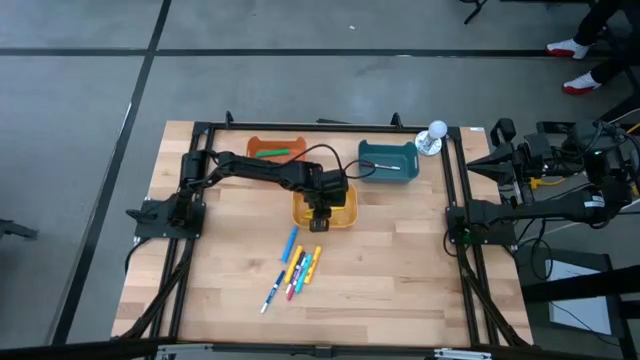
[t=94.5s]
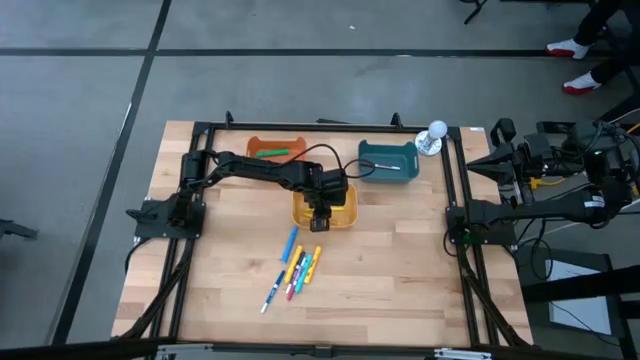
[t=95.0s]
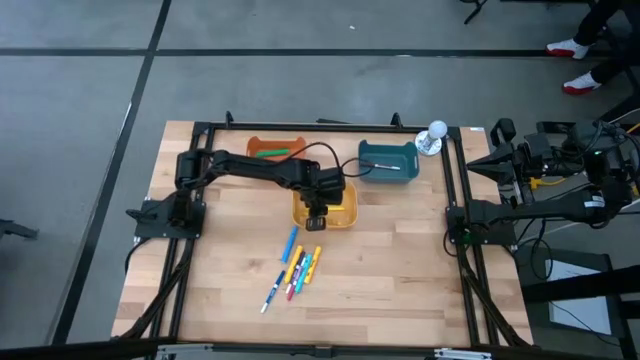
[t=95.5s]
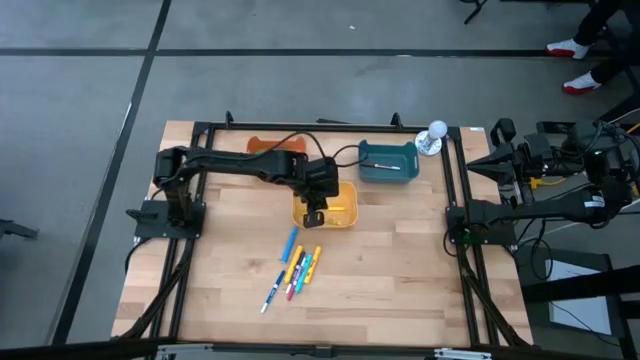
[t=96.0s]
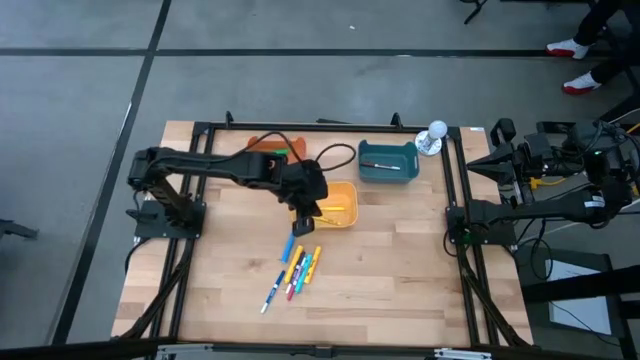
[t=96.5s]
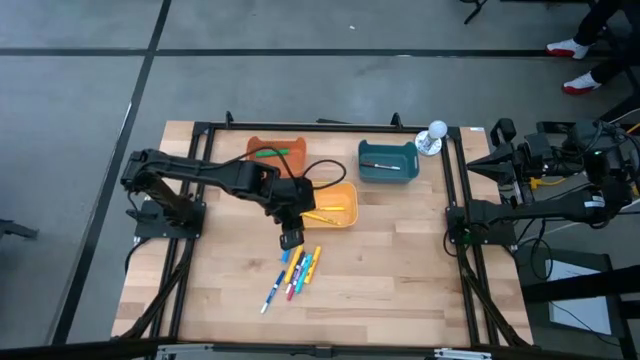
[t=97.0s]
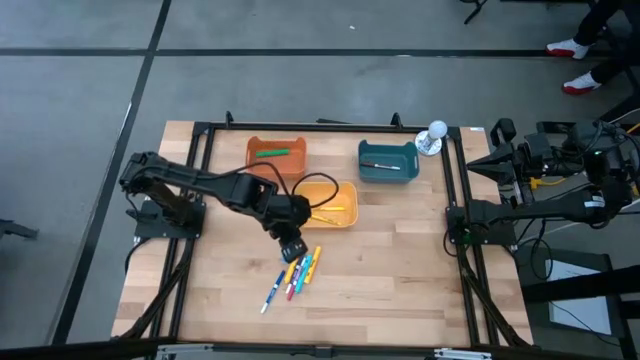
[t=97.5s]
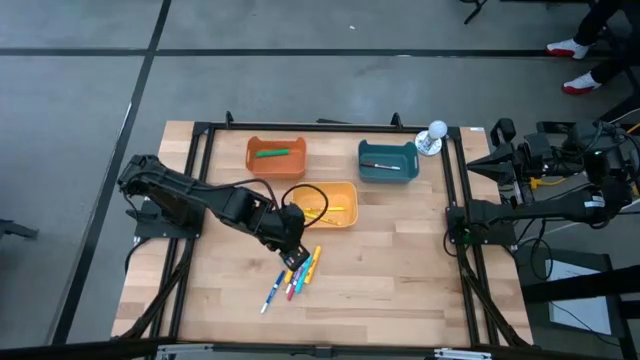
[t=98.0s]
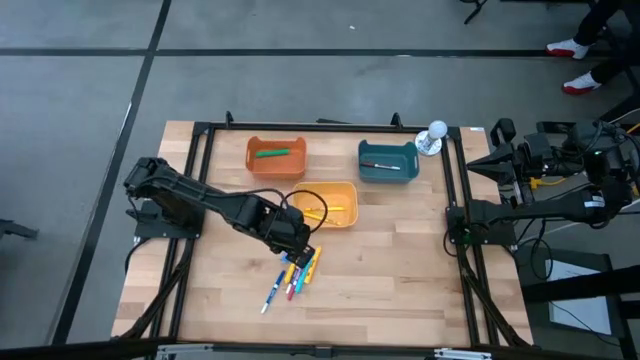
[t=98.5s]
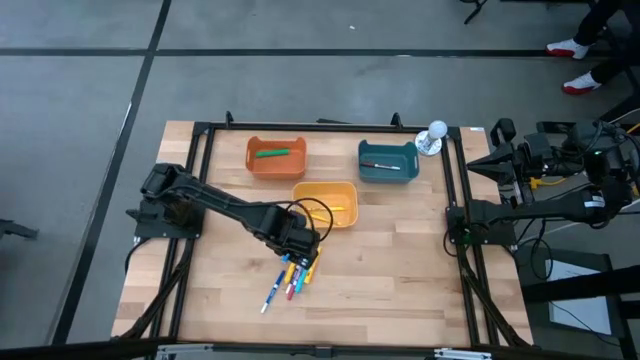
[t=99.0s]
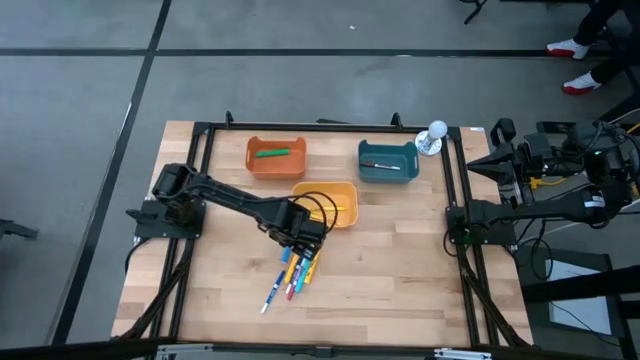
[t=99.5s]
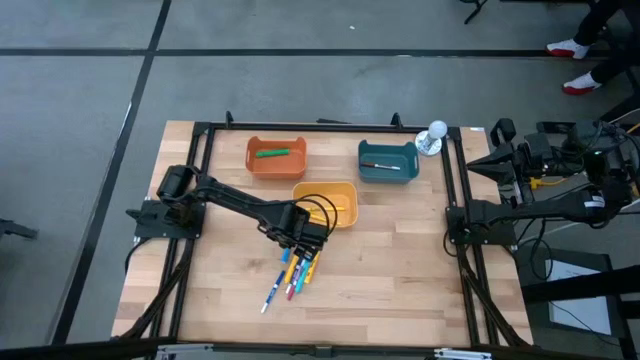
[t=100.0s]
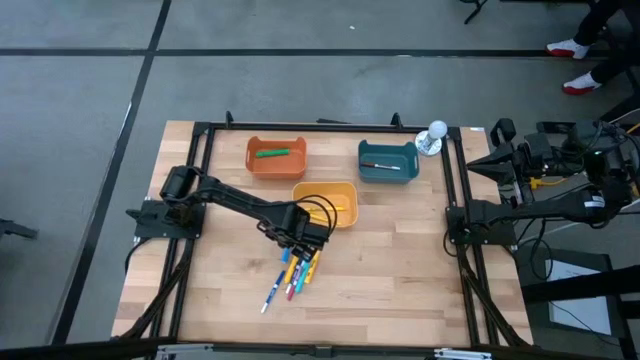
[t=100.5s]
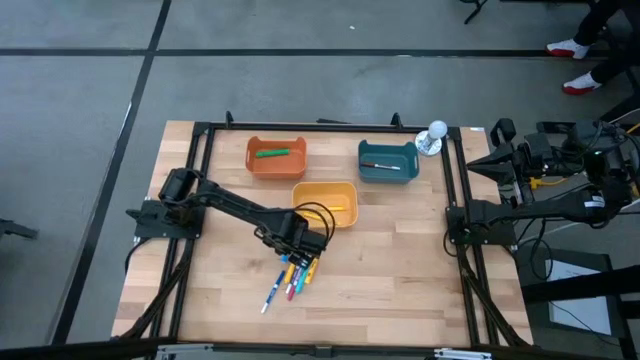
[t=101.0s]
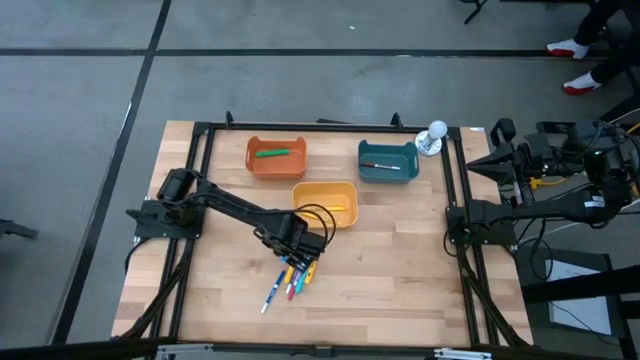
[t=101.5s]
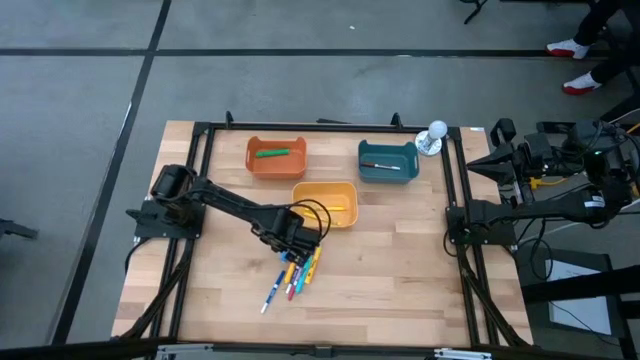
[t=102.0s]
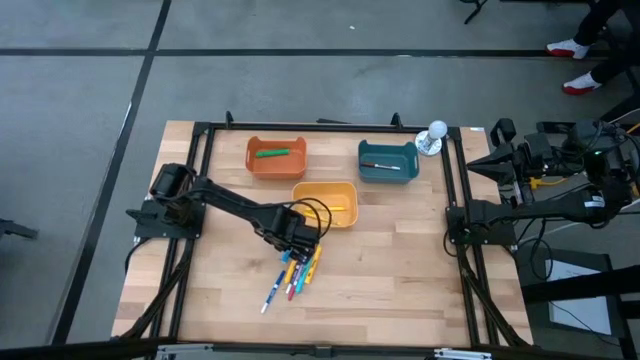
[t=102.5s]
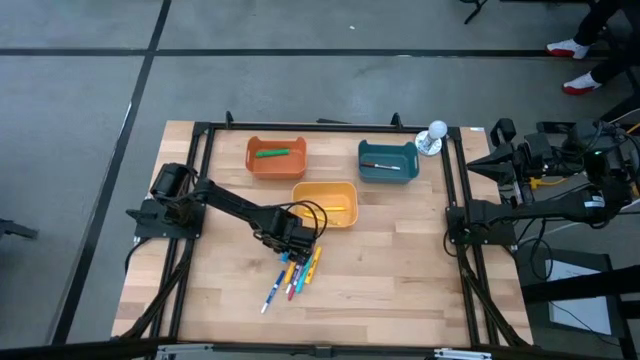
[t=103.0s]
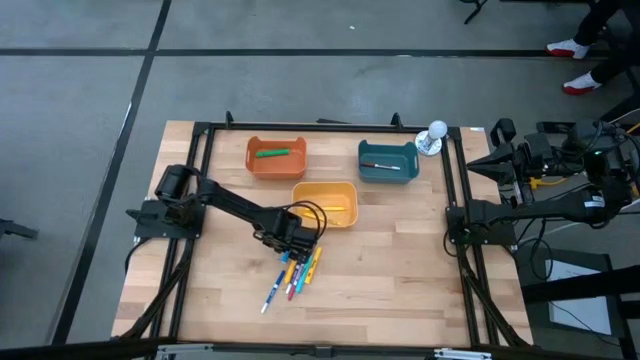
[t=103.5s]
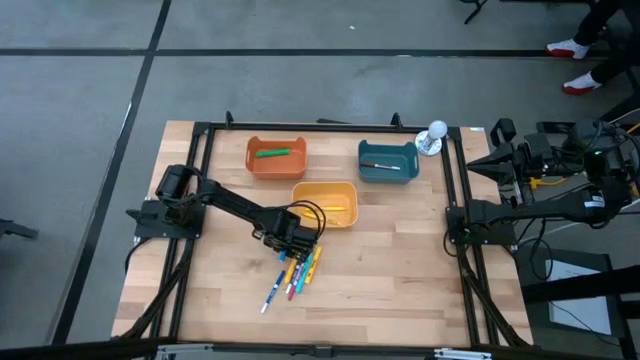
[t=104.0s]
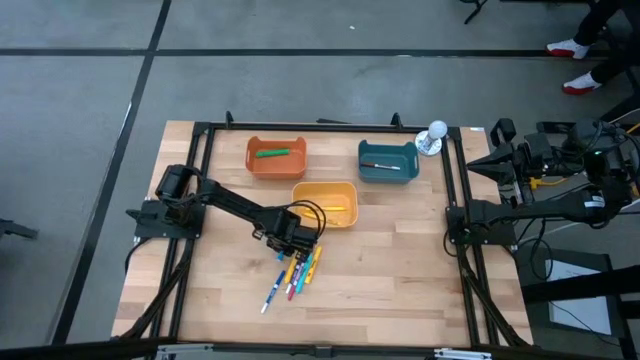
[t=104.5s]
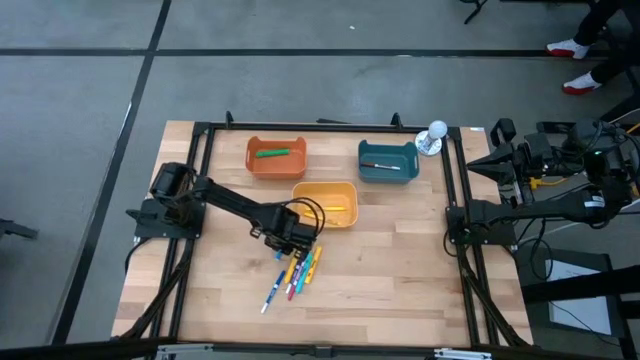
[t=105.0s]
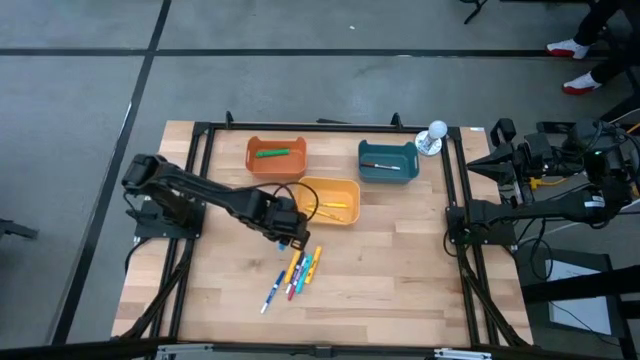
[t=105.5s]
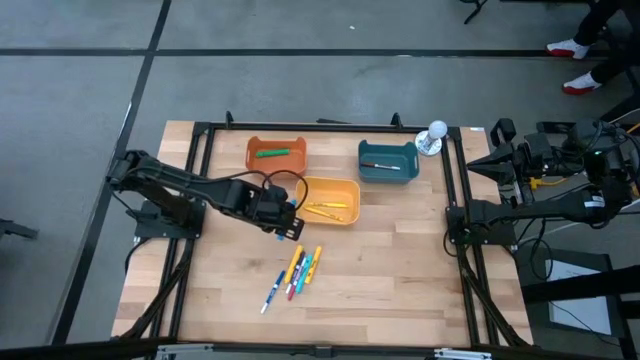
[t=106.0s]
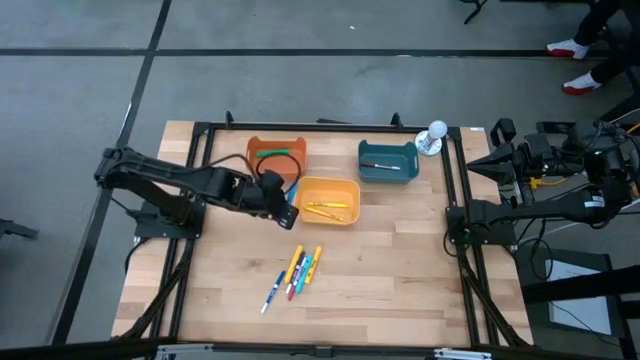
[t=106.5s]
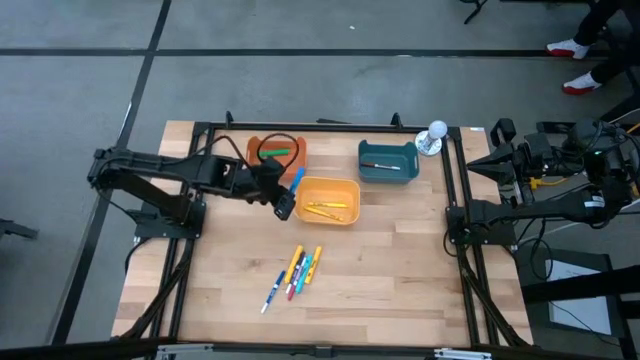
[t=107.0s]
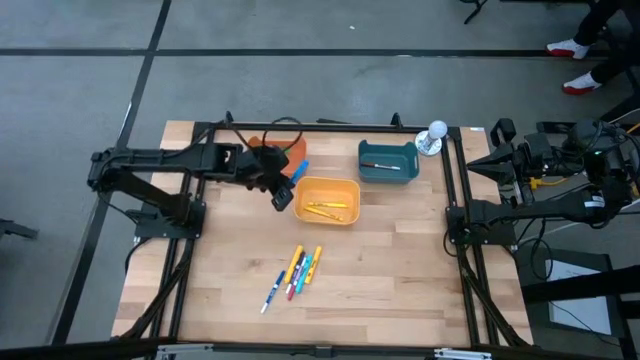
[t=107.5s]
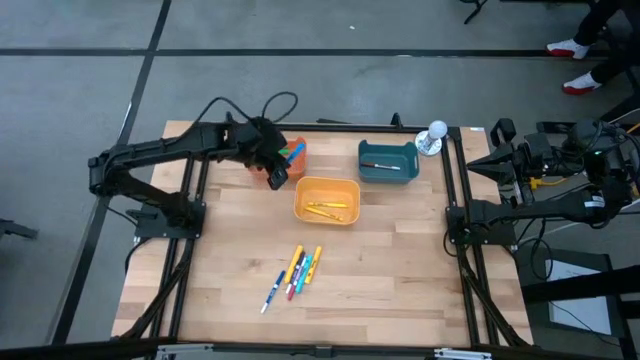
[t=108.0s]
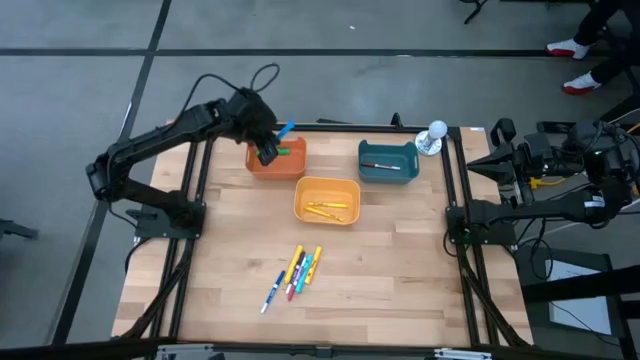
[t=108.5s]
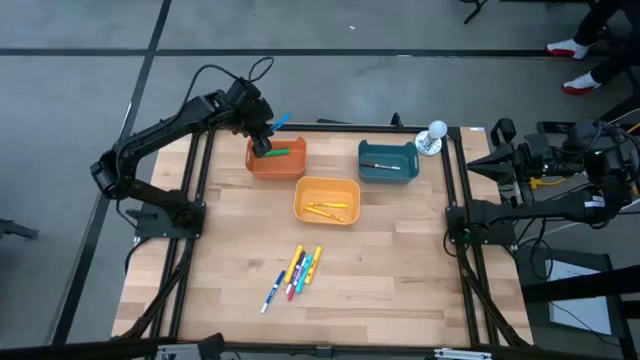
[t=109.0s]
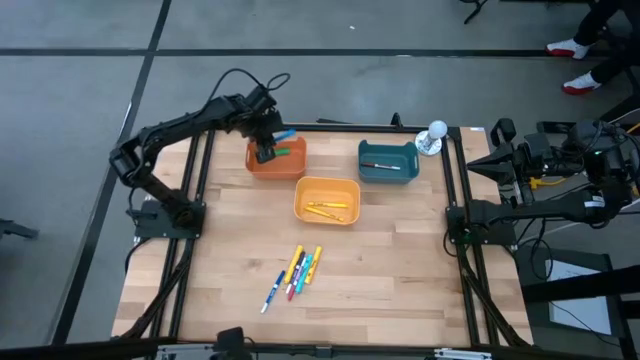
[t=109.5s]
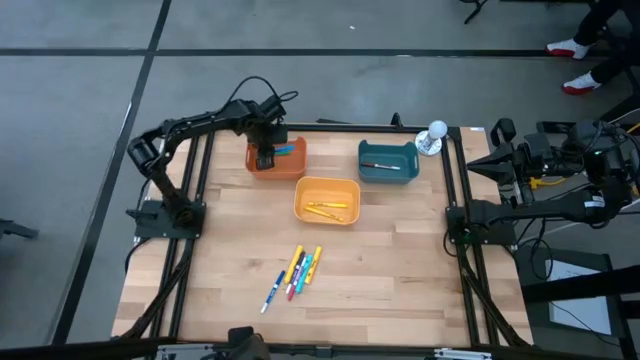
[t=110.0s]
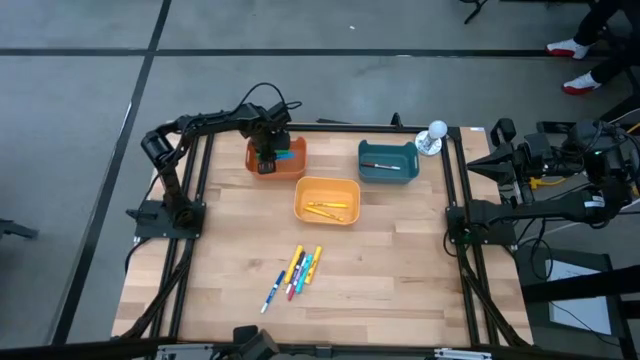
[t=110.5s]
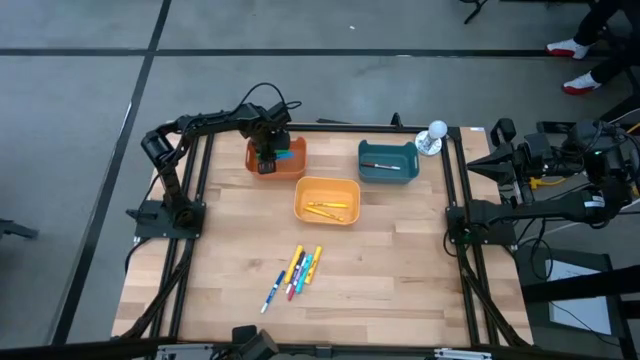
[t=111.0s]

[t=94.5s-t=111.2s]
Task: Pick & Place Markers
Put the left big blue highlighter pen into the orange bin

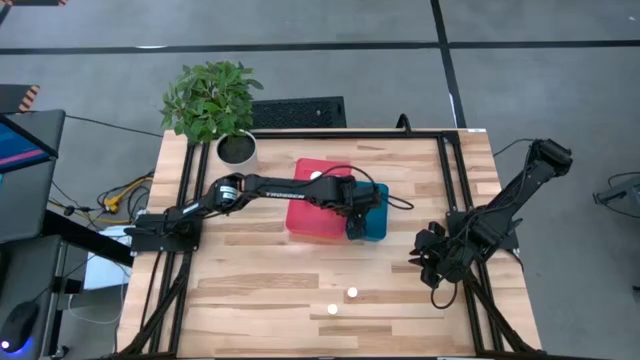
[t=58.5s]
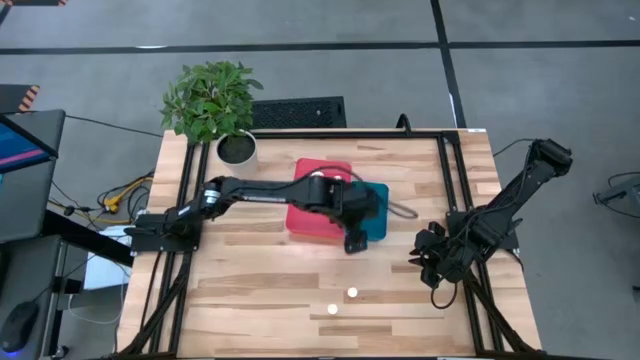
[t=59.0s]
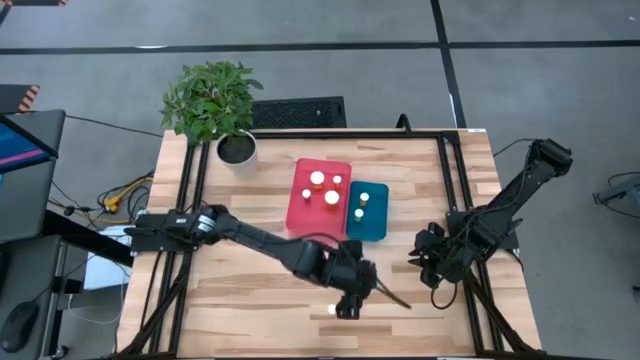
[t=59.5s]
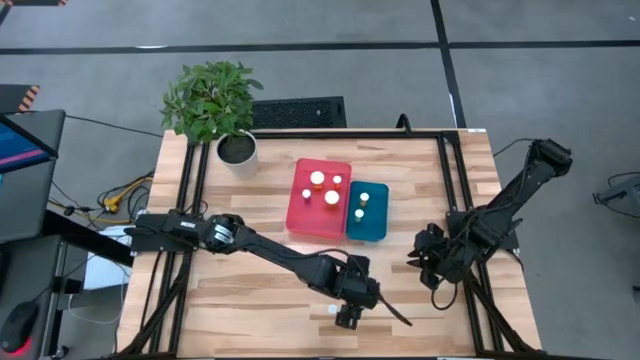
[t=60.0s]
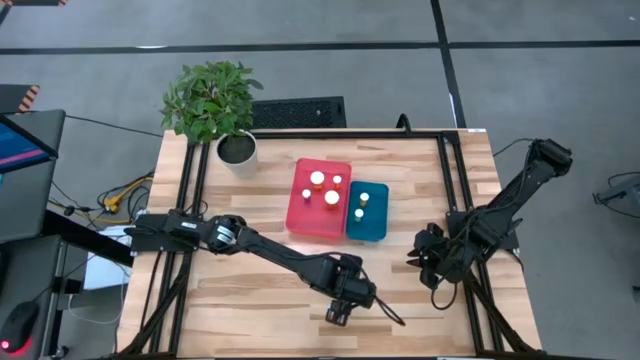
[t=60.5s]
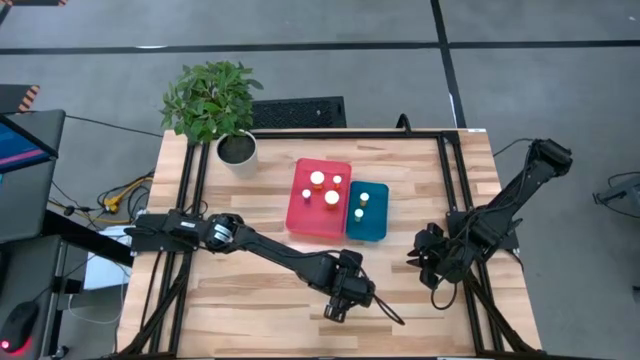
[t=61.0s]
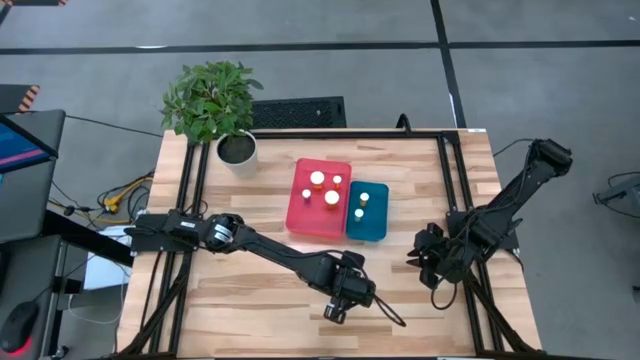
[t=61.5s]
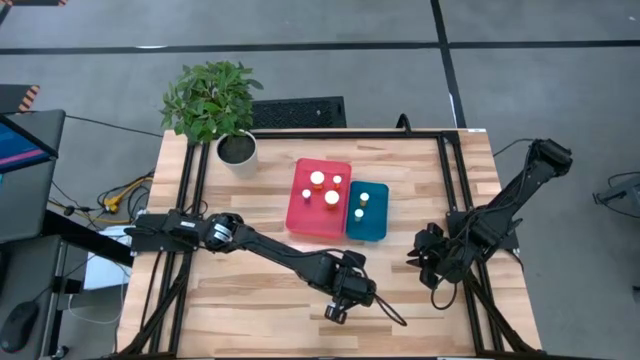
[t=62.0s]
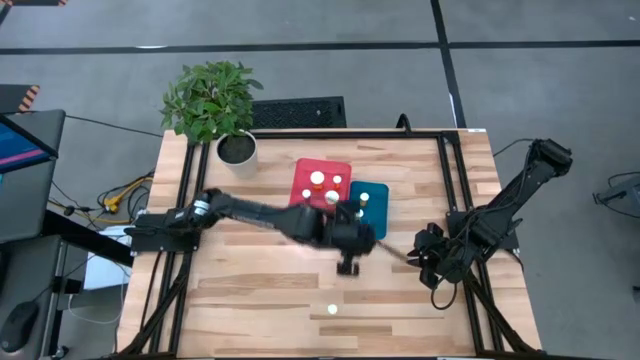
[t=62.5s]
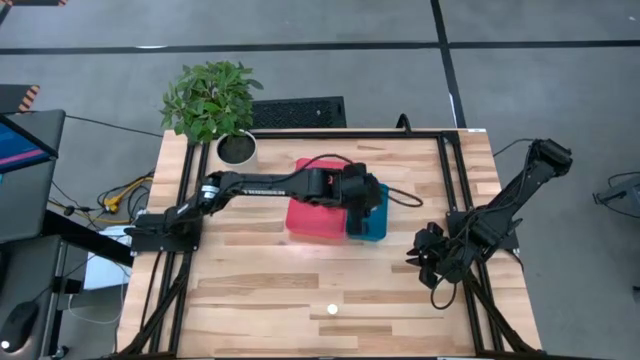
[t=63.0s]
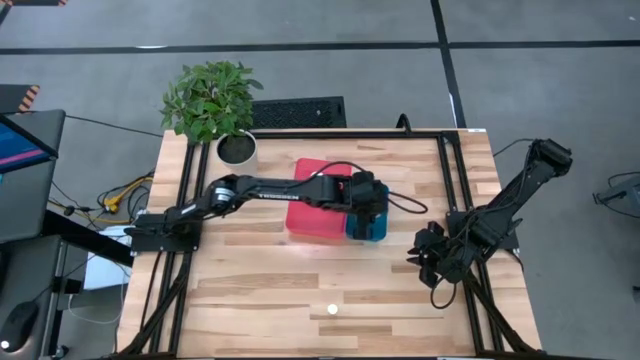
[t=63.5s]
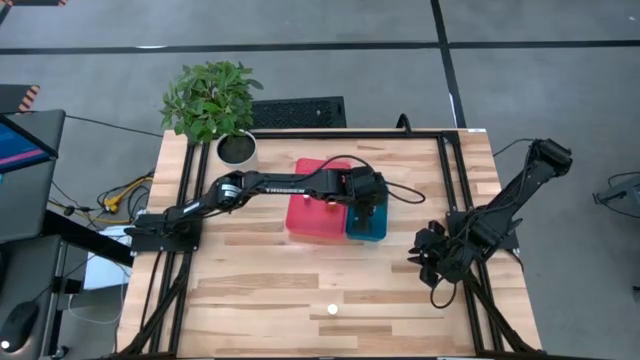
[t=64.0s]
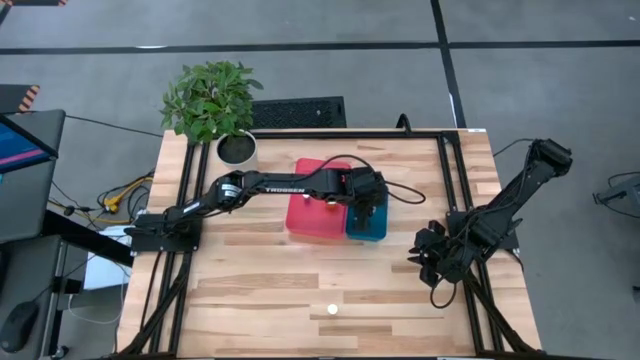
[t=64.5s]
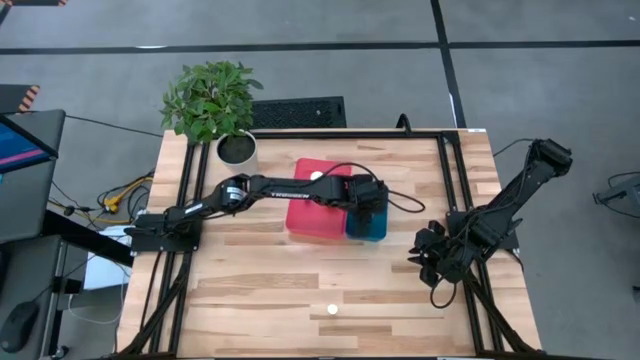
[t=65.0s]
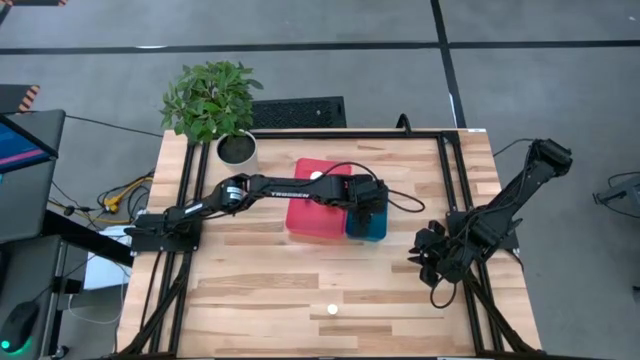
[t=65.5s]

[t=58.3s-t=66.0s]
Task: Pick and place medicine bottles into bin by pill shape (circle, oval)
Put the red pill bottle into the blue bin
